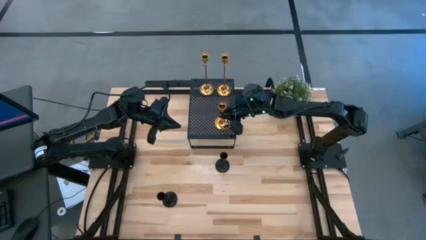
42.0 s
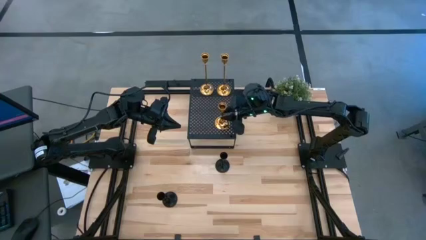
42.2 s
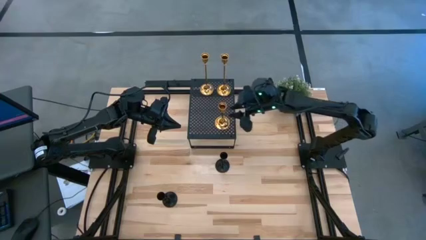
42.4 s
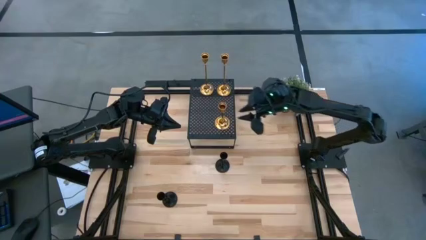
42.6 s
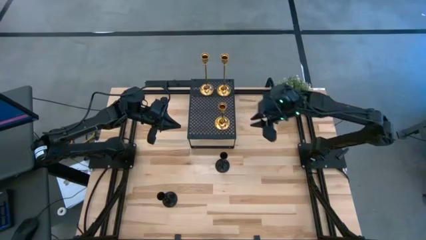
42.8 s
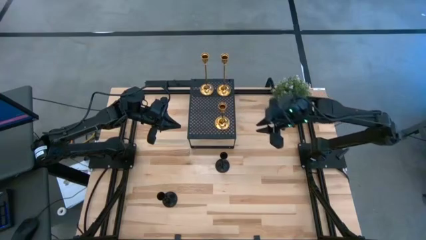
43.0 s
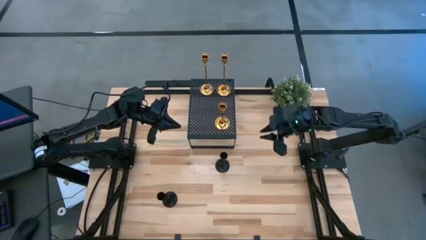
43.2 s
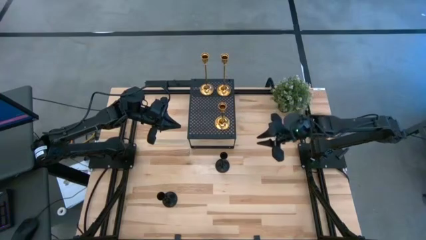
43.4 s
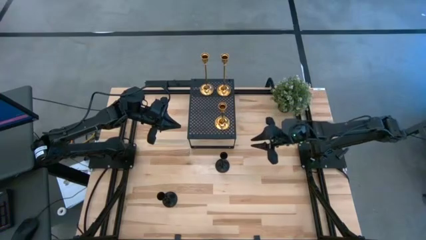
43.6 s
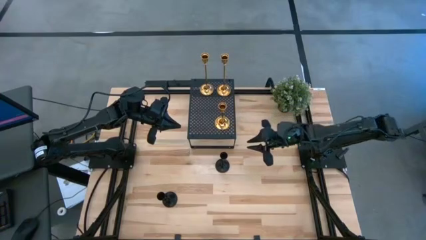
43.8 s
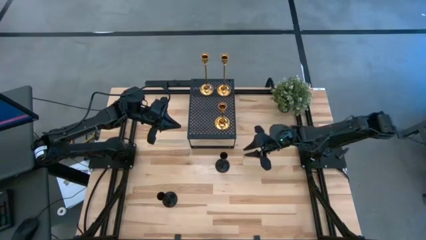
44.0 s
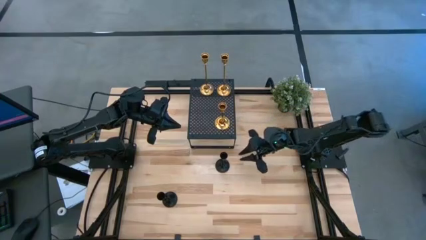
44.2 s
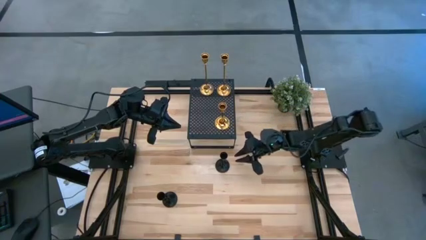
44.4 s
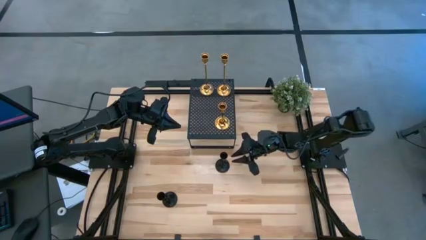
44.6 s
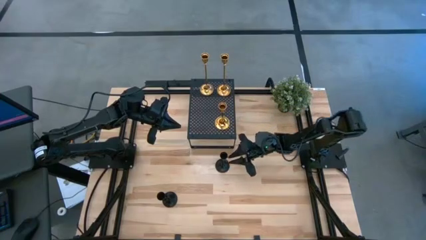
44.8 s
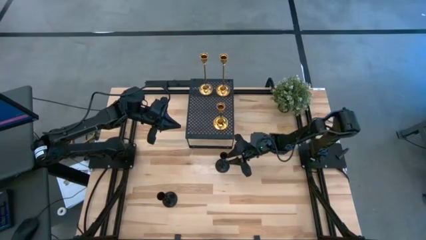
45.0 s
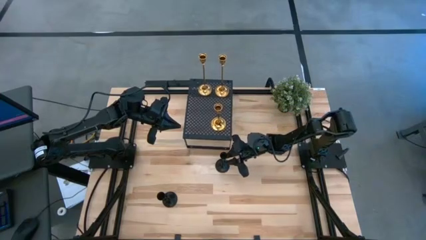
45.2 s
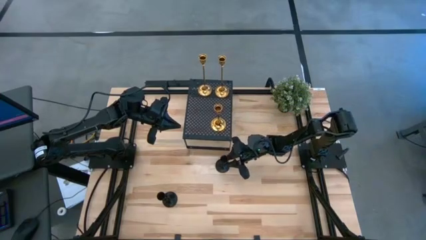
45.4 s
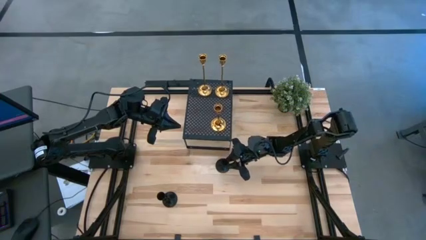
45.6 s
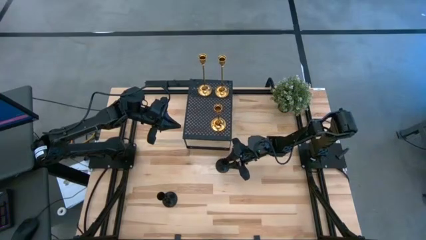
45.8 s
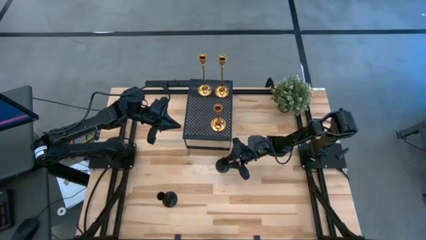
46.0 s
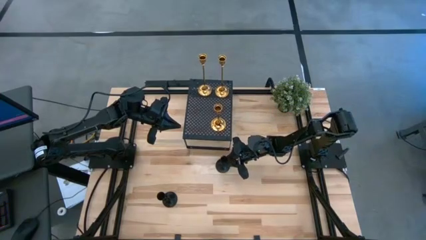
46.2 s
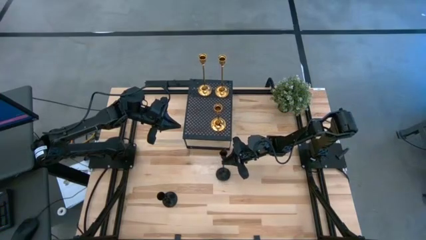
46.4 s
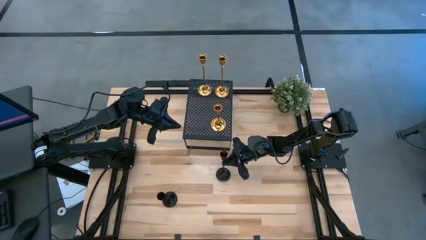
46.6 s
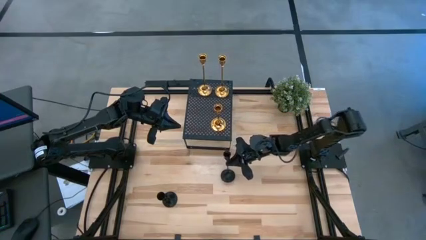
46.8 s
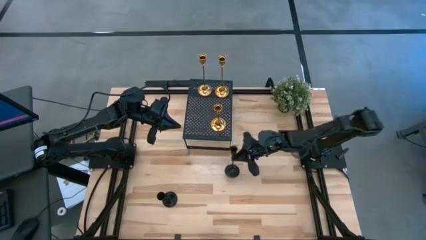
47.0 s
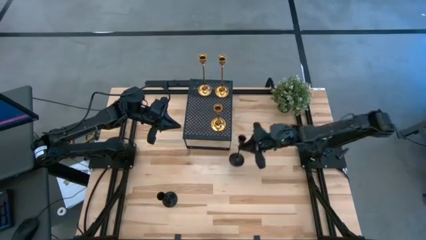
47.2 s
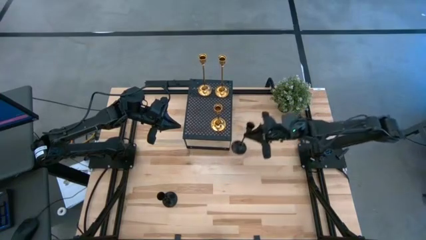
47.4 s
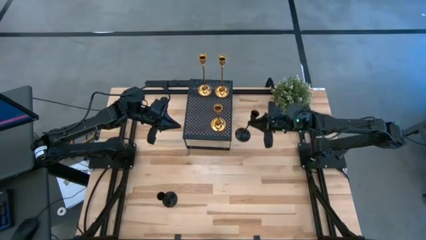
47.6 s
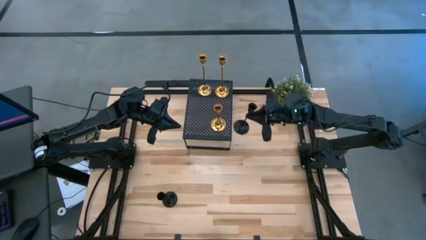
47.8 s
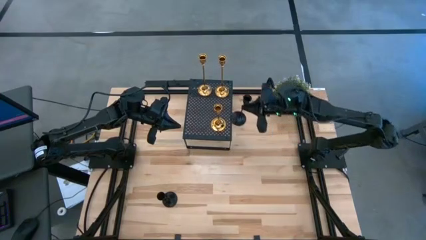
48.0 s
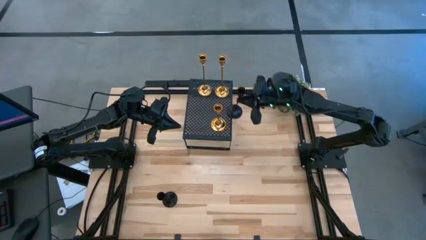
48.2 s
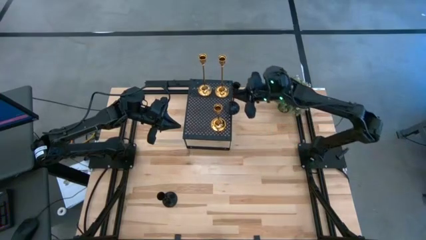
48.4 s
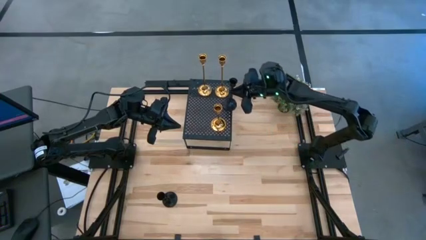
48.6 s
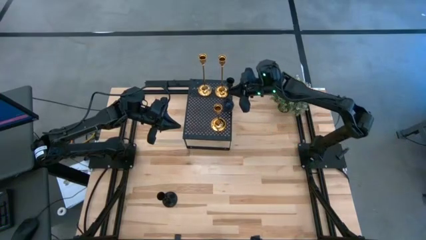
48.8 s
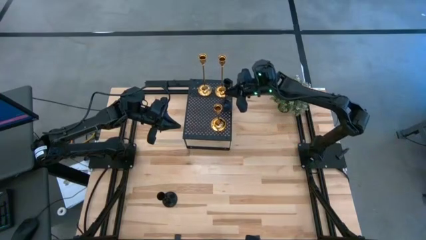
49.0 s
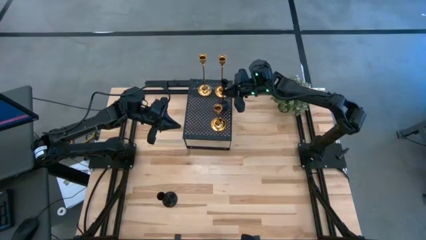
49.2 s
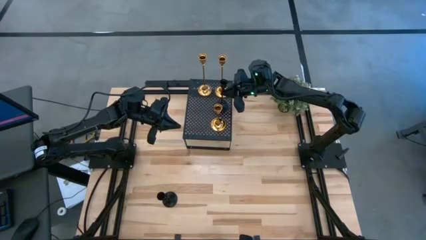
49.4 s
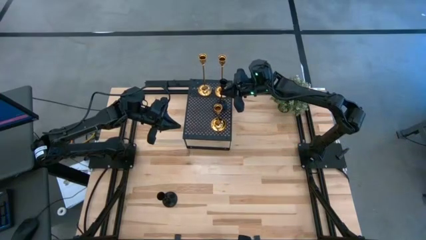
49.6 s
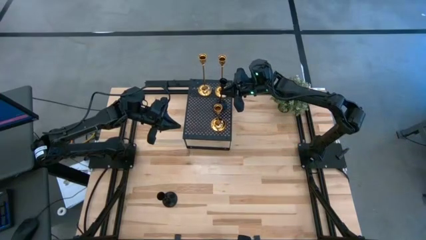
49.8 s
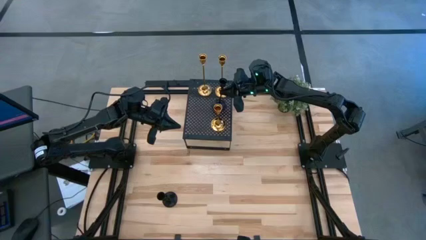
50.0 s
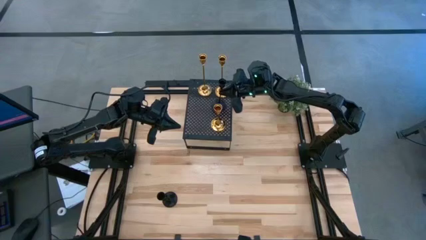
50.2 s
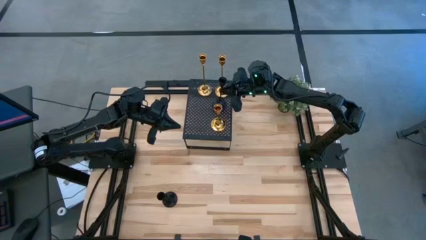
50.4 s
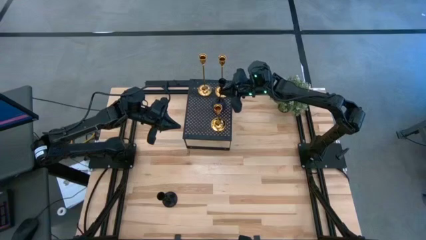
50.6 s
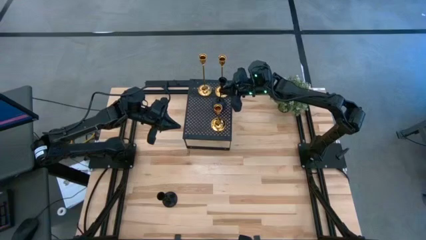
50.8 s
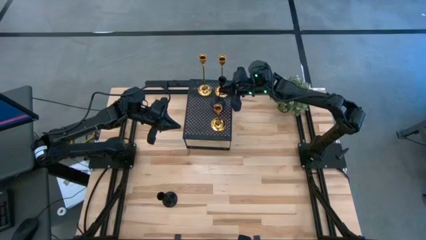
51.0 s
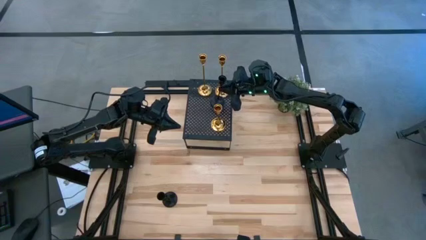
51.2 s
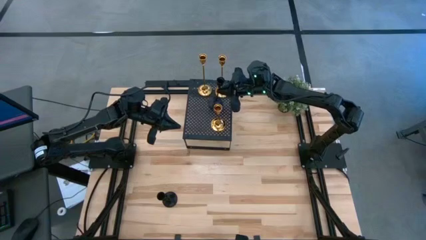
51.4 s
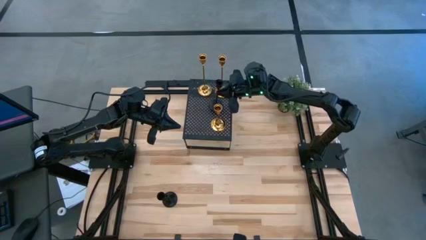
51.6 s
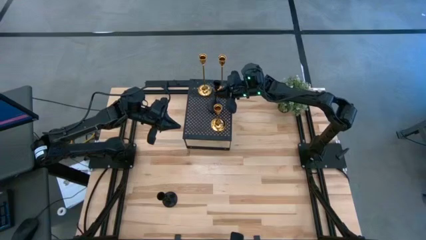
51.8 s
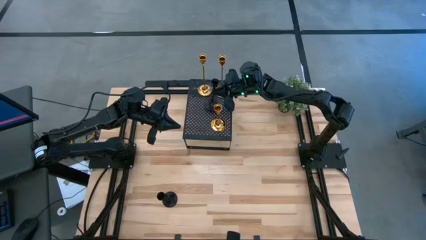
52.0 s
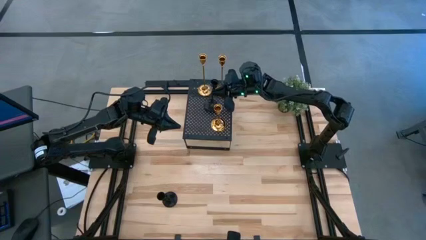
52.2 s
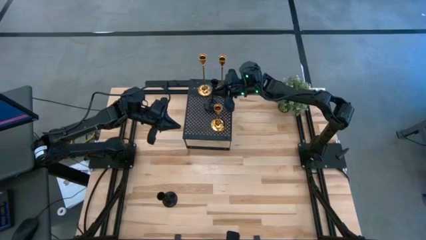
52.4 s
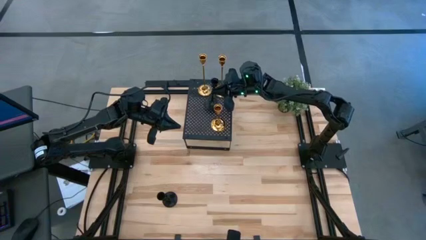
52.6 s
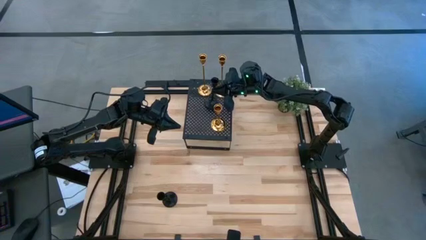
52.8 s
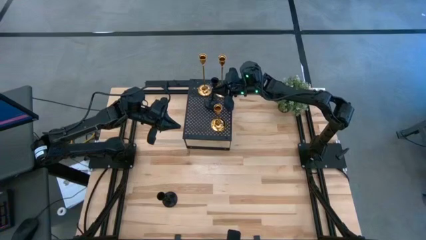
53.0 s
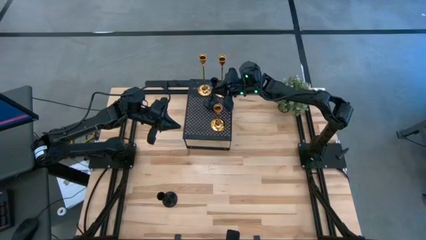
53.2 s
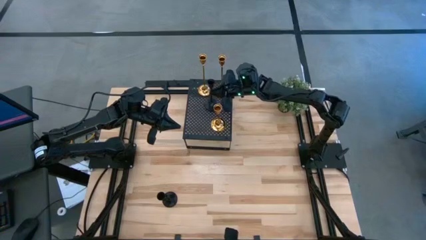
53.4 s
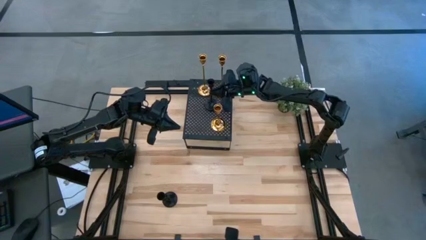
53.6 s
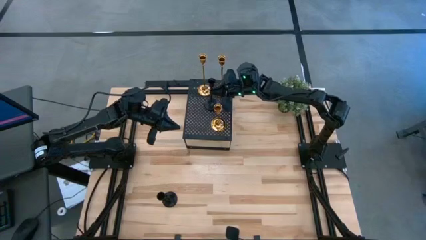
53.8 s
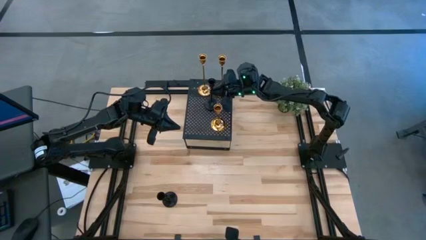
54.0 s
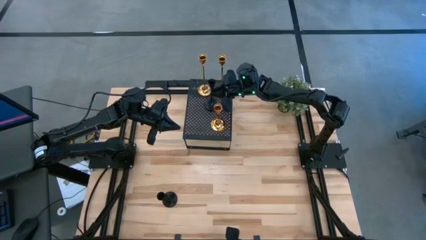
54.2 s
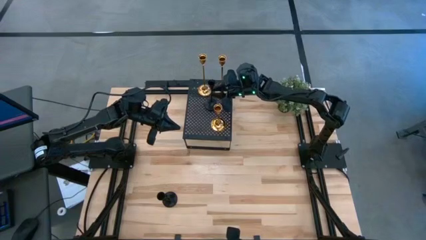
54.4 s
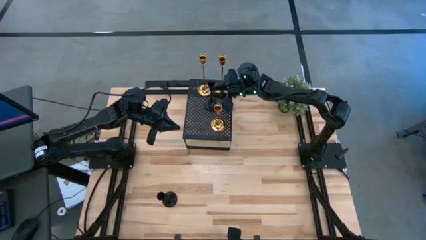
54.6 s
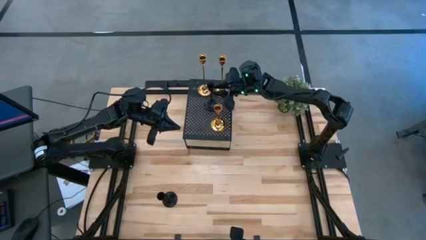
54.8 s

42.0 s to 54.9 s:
Task: Pick & Place candle stick holders
Put the top black candle holder on the shelf

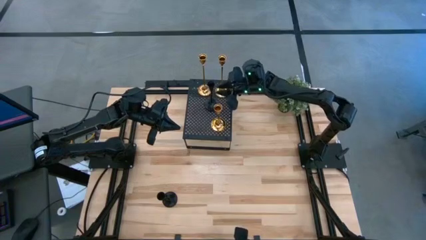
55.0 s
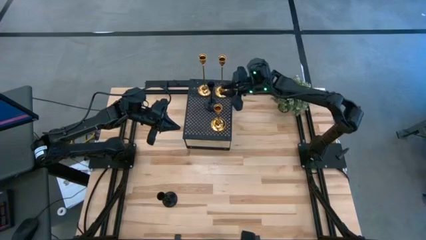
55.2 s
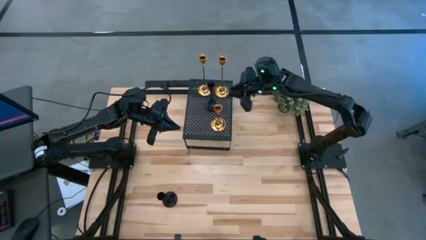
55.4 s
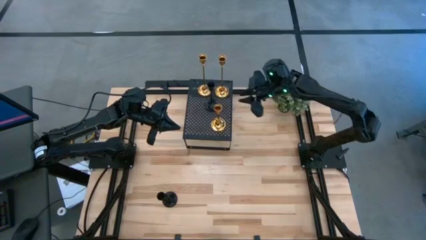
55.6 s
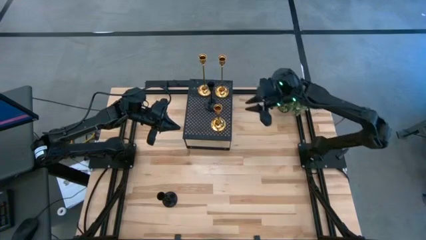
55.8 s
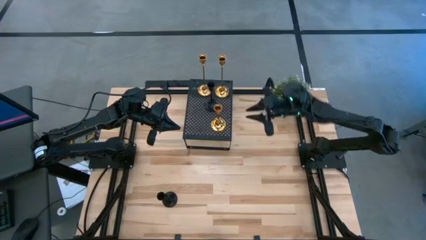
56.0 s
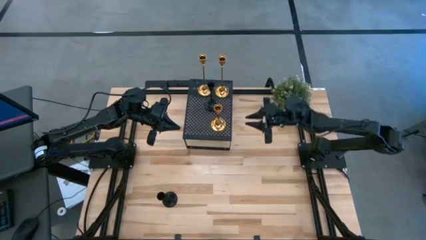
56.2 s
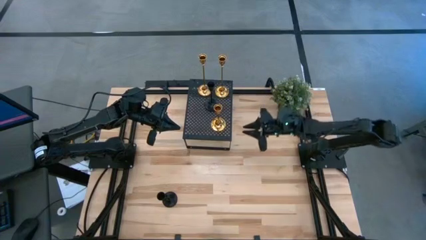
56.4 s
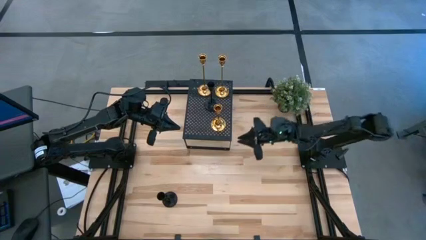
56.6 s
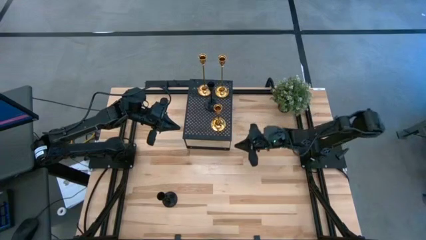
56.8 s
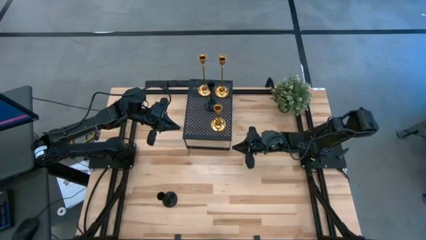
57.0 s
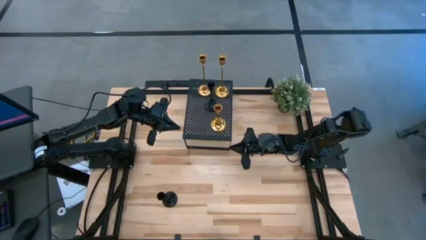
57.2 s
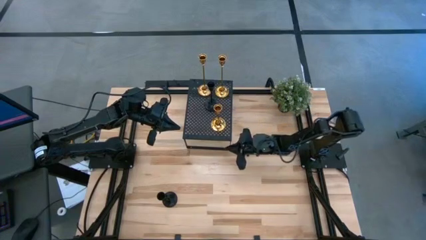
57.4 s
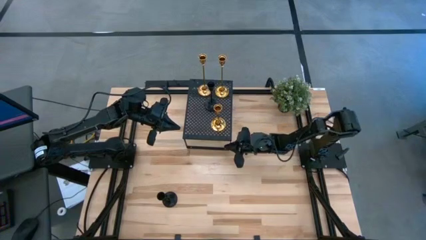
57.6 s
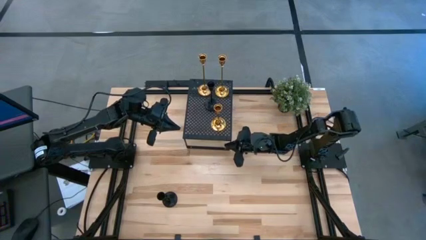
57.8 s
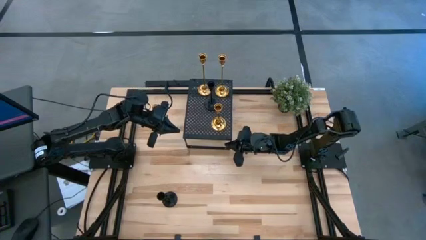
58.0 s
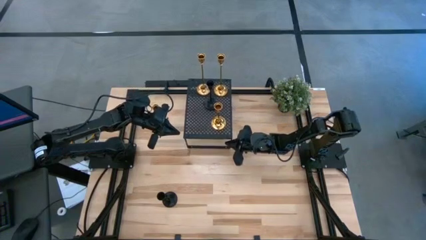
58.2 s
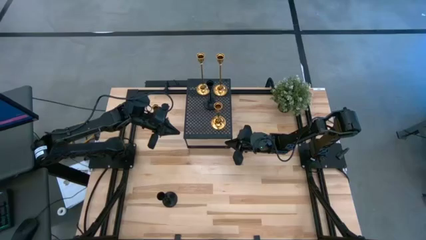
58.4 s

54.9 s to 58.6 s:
Adjust the black shelf
